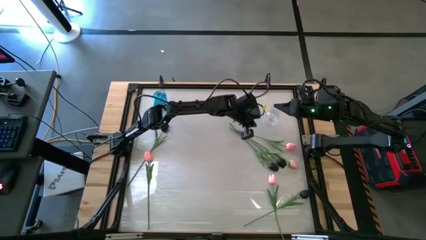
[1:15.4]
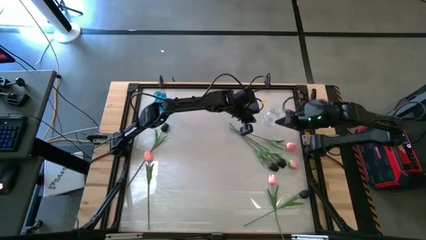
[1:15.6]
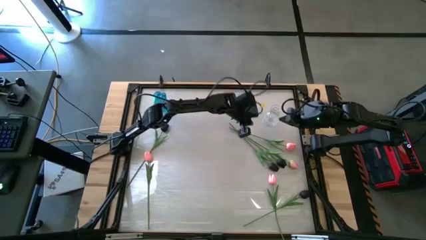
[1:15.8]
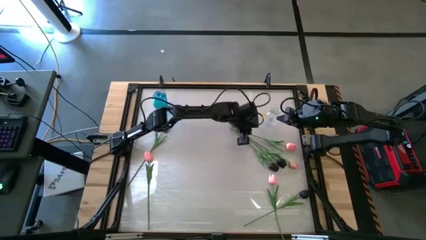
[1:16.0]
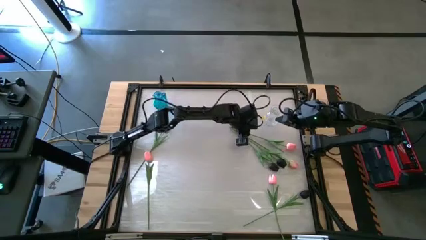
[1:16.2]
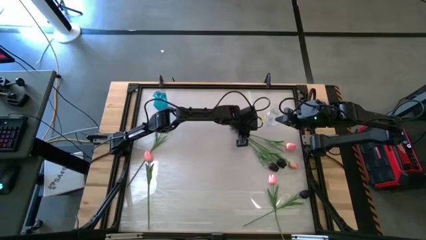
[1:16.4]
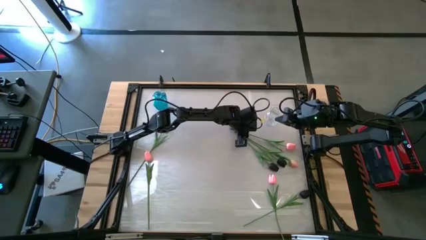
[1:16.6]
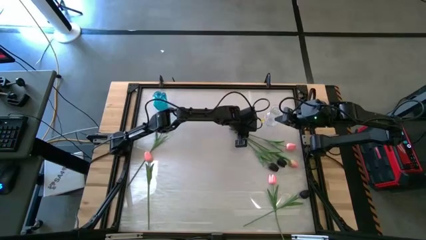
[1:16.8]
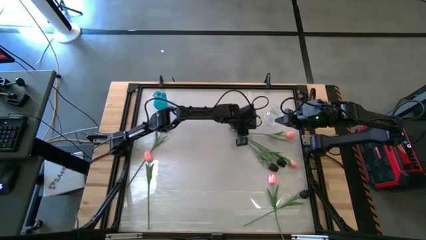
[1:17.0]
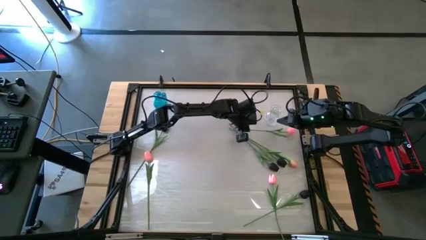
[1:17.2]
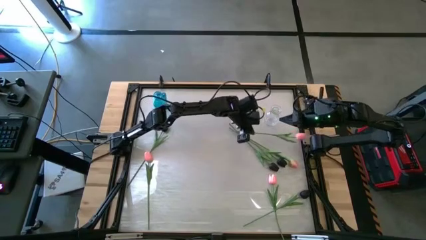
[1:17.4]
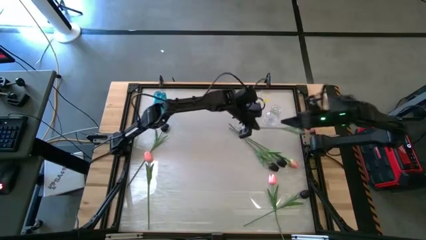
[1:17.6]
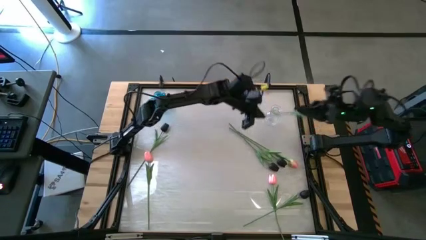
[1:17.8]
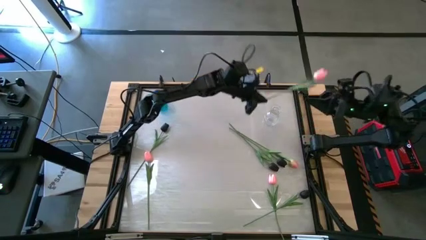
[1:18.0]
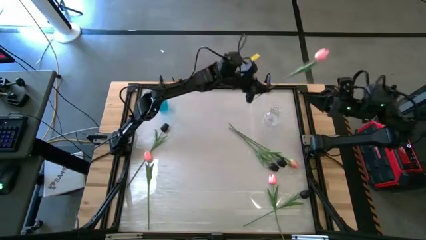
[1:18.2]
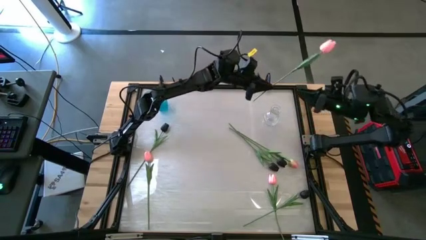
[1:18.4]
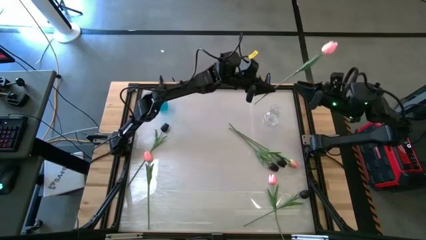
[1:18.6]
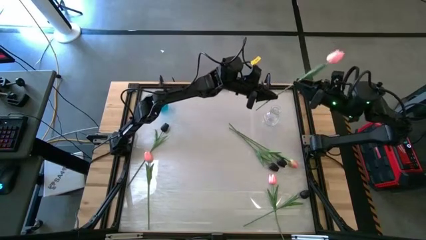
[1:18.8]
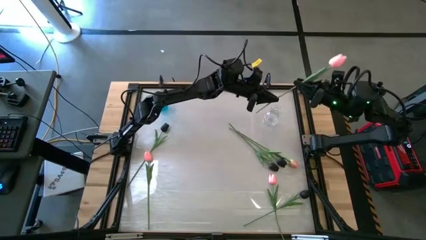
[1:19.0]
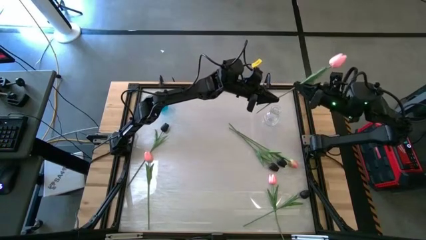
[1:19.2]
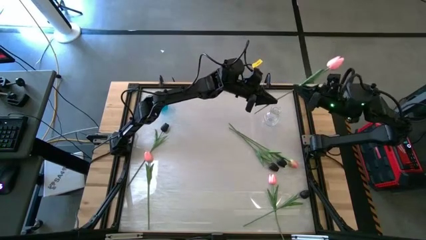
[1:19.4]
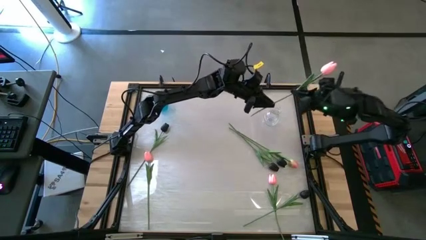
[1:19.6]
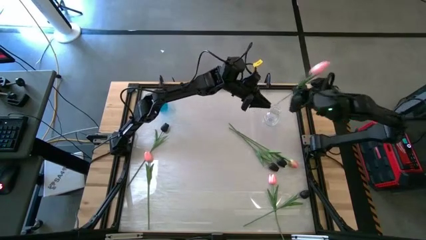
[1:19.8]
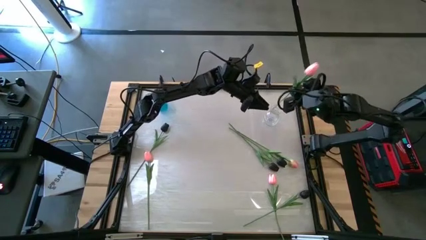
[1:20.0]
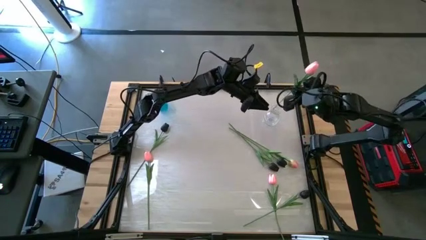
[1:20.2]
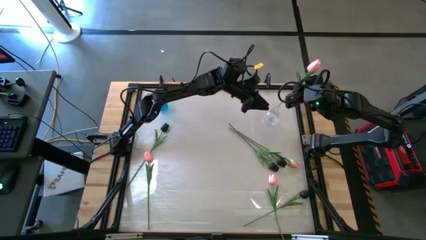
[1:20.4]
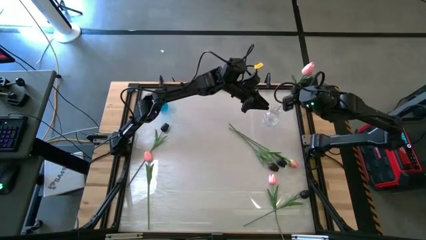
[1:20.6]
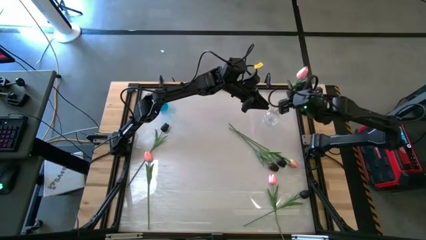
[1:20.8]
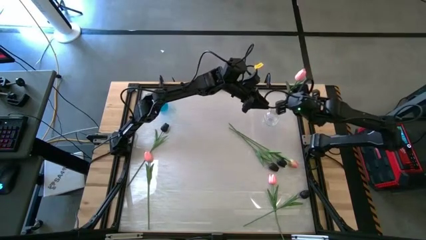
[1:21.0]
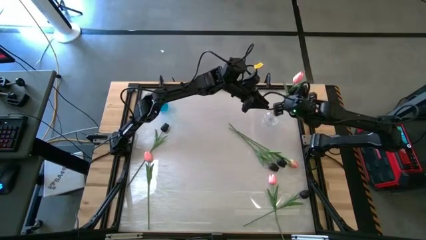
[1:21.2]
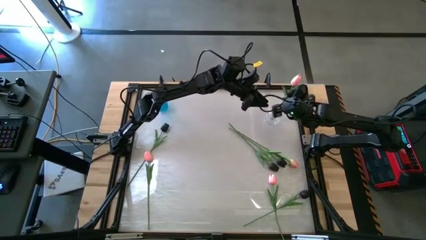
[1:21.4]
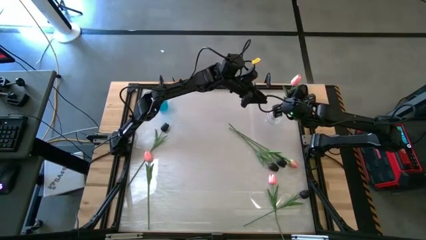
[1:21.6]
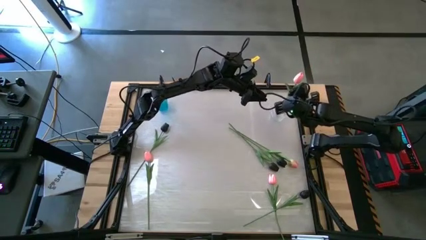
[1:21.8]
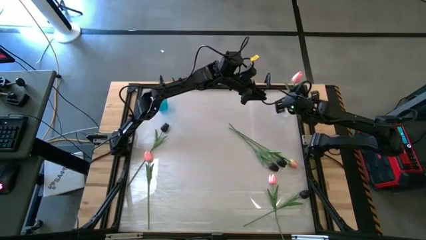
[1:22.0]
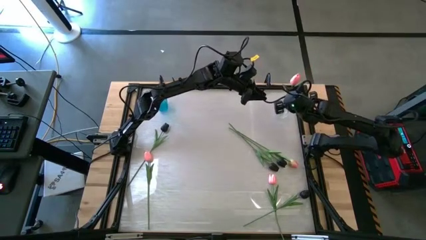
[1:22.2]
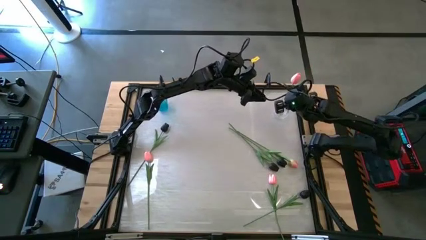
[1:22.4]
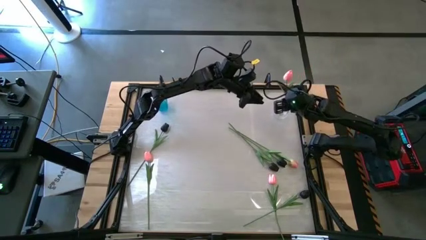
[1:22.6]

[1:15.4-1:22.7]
Task: Sort flowers into vase by color
Put the pink flower into the transparent vase

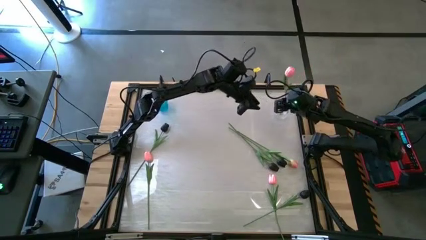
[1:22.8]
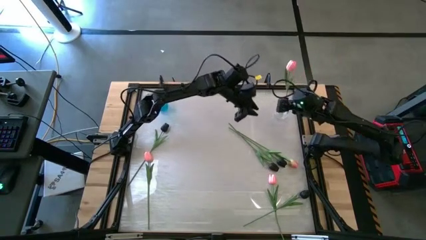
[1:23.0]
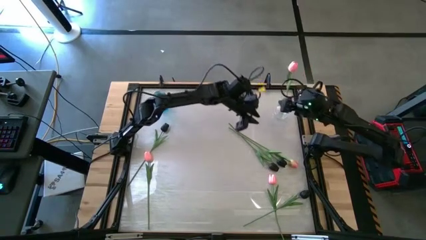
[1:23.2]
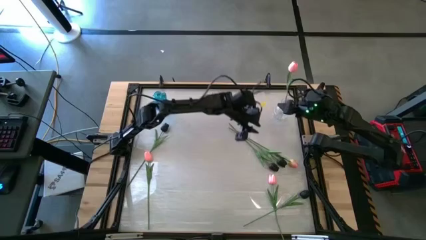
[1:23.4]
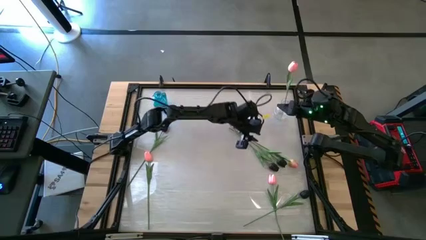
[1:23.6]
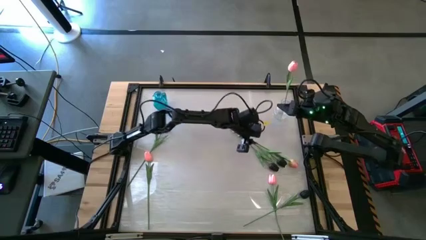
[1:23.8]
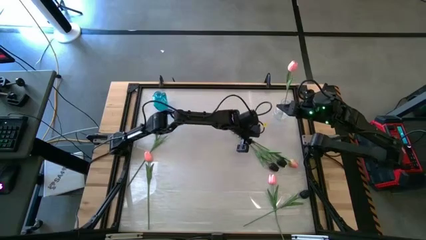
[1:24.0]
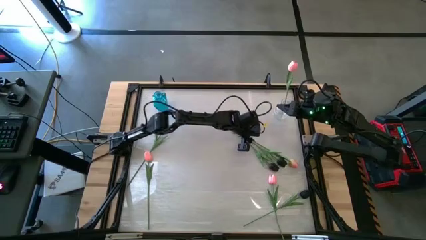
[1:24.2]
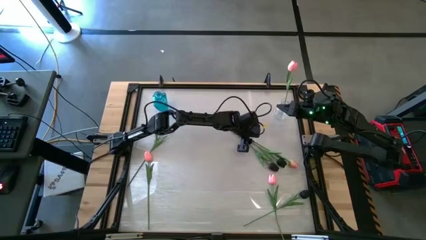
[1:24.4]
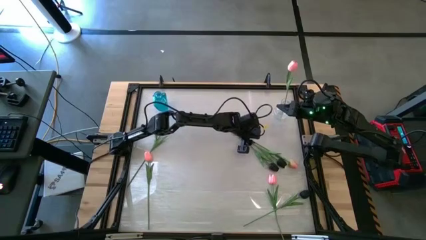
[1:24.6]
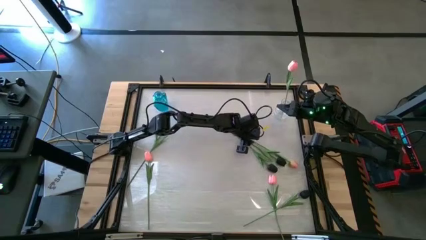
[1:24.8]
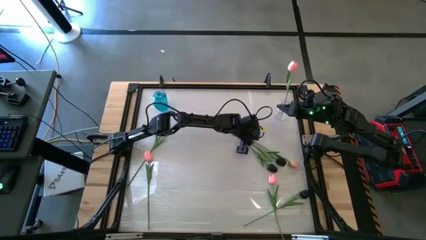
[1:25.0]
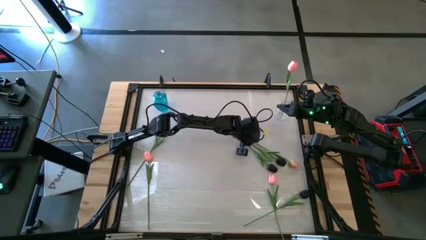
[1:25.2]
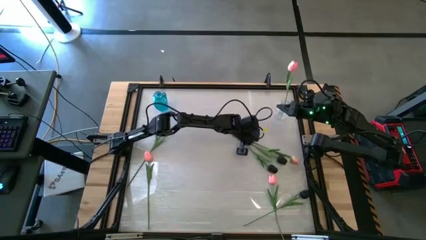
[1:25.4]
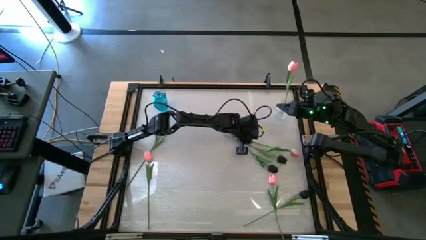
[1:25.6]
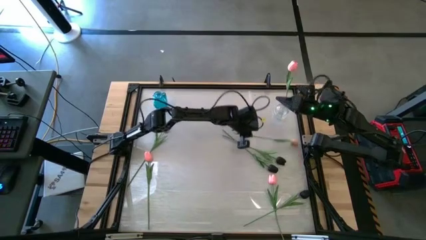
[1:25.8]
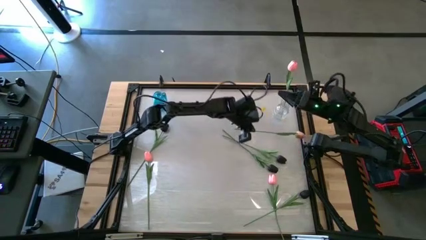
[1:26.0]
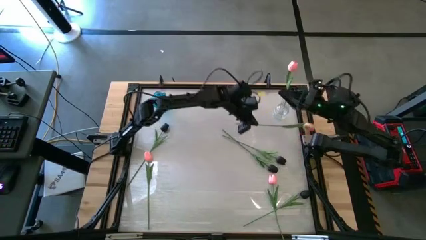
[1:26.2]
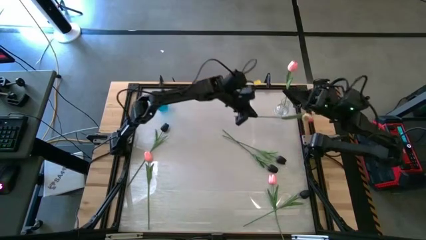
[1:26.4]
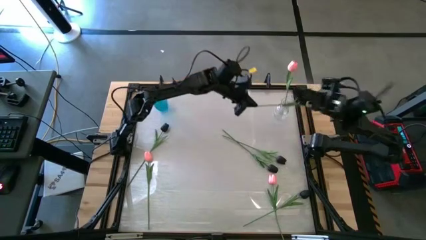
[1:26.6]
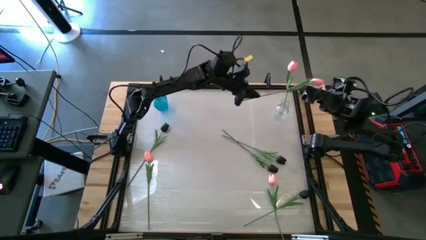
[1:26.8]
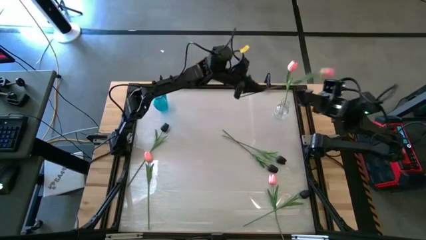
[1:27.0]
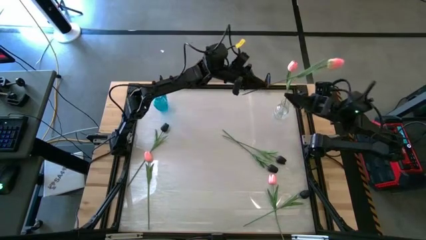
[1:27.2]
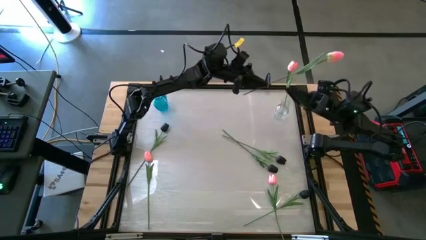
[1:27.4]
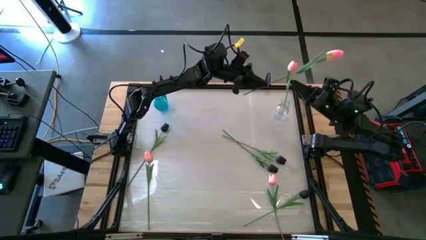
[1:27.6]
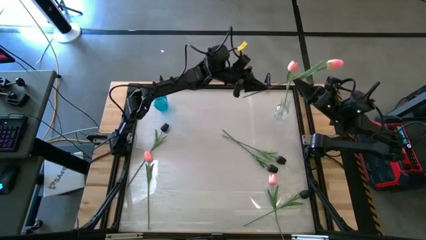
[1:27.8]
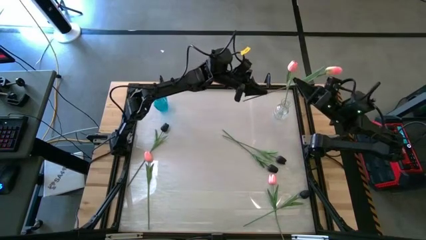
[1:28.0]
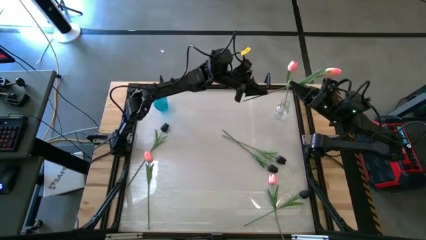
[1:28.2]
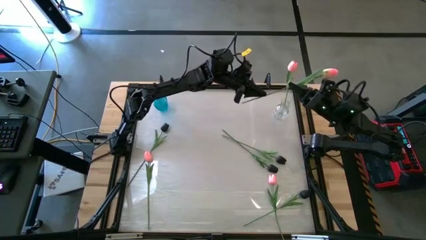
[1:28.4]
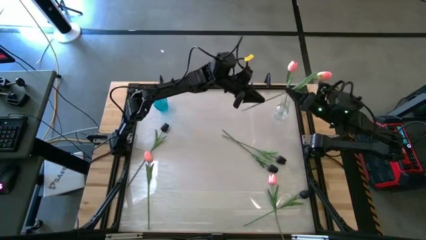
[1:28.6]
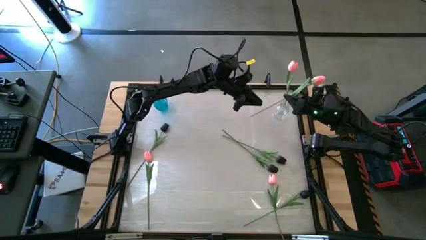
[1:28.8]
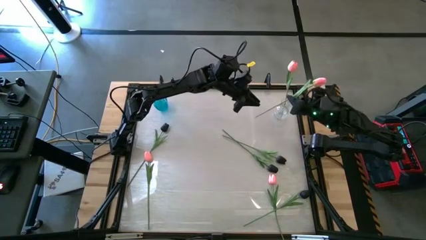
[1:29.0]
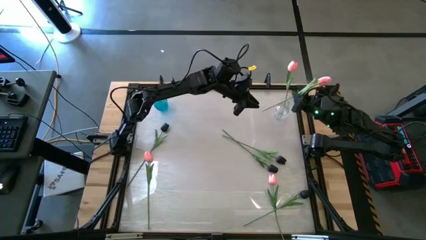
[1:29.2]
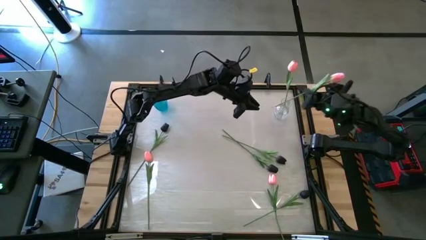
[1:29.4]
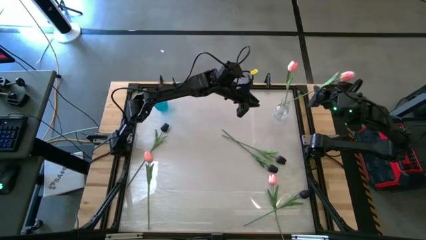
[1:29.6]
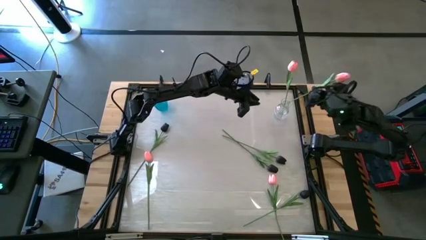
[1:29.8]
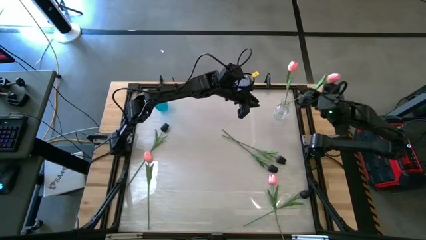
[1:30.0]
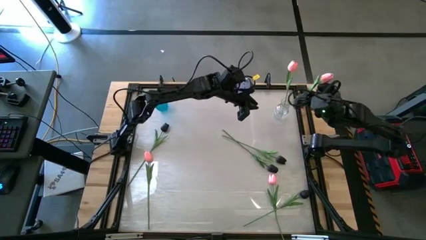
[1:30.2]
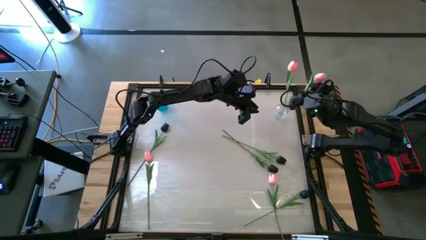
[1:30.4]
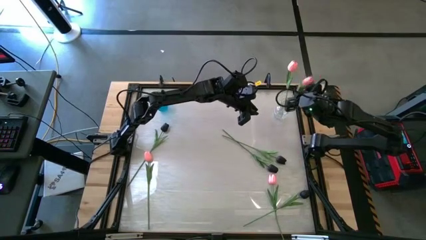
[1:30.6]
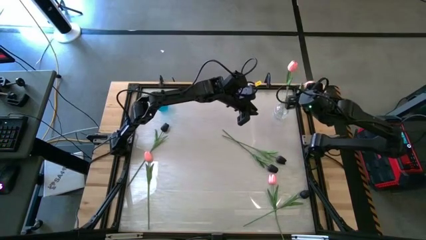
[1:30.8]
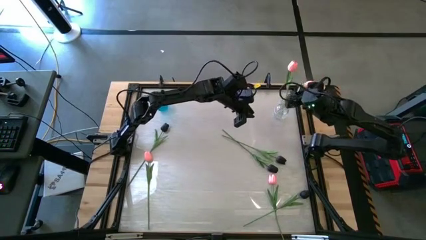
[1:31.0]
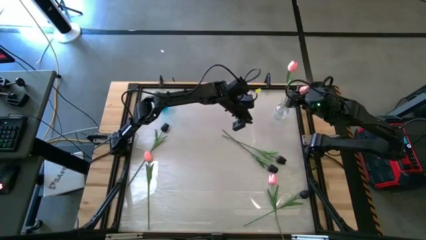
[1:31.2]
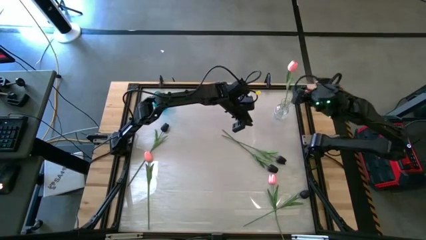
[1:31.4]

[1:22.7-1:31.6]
Put the pink flower into the transparent vase
